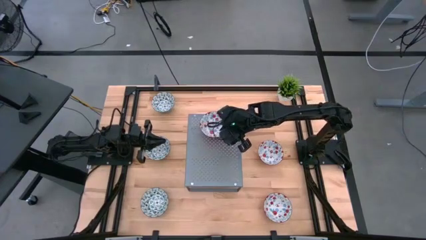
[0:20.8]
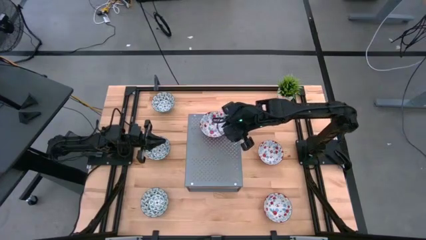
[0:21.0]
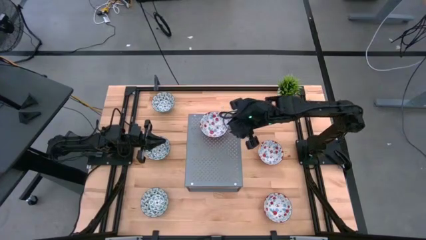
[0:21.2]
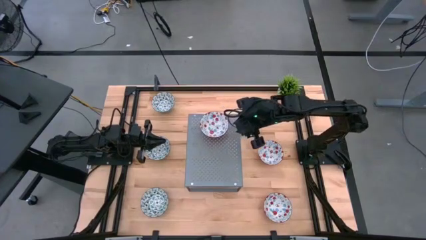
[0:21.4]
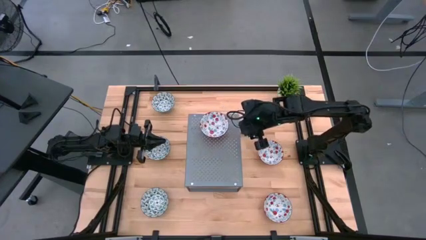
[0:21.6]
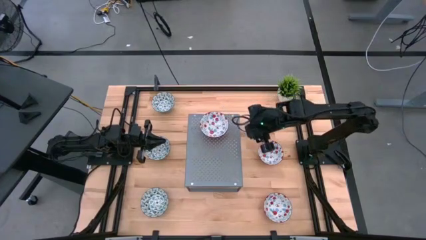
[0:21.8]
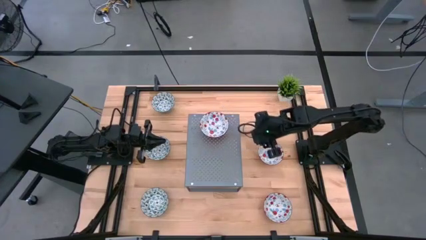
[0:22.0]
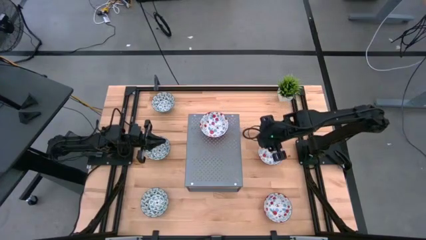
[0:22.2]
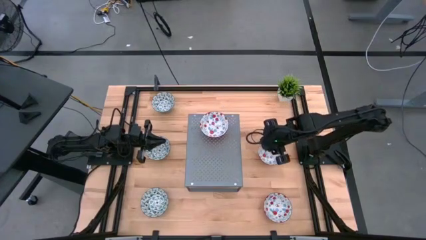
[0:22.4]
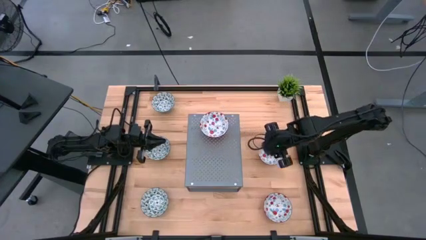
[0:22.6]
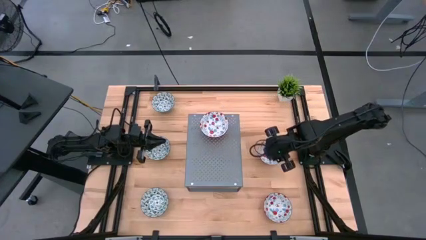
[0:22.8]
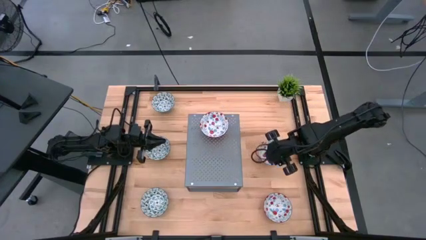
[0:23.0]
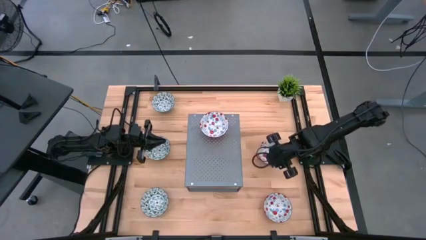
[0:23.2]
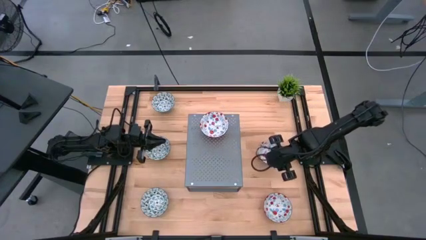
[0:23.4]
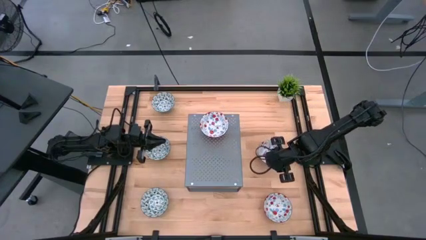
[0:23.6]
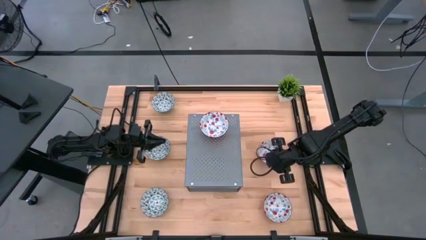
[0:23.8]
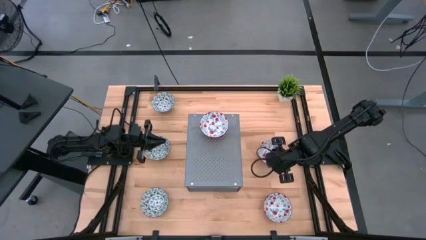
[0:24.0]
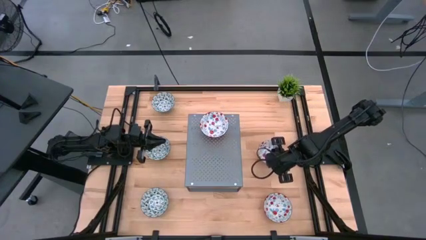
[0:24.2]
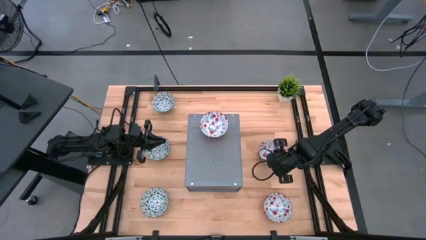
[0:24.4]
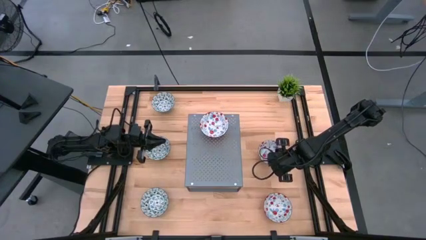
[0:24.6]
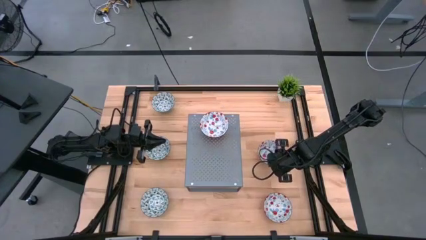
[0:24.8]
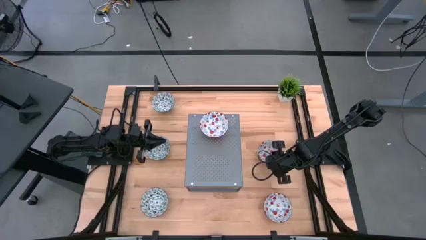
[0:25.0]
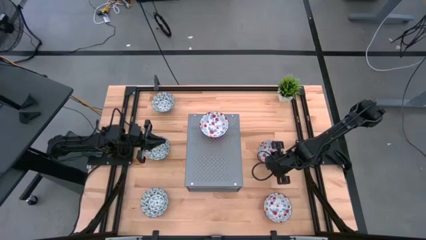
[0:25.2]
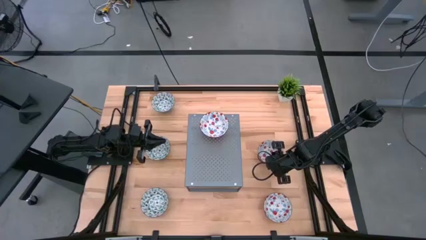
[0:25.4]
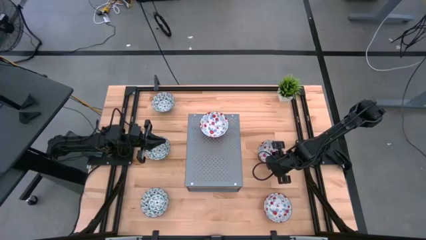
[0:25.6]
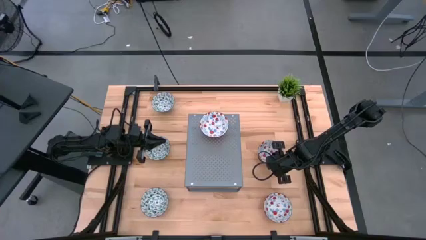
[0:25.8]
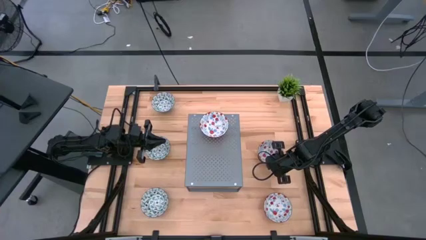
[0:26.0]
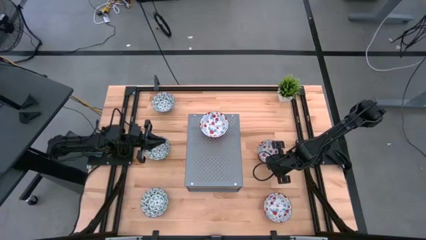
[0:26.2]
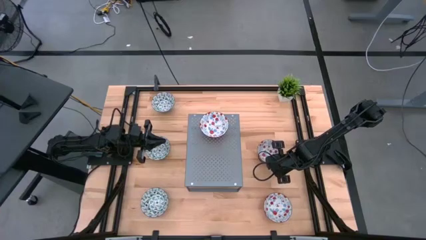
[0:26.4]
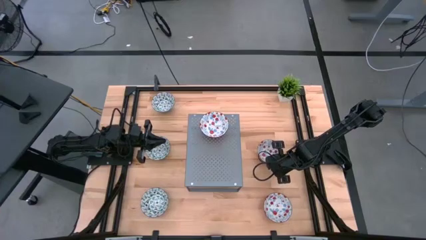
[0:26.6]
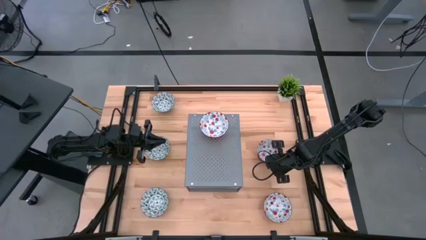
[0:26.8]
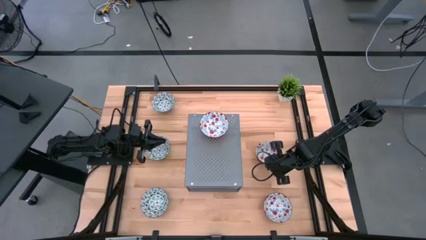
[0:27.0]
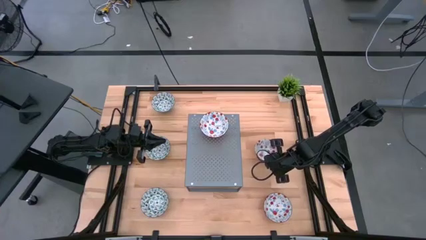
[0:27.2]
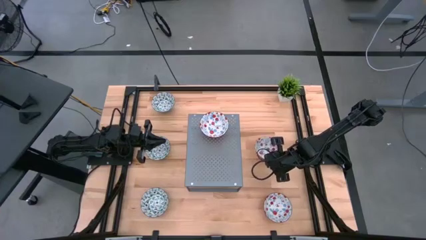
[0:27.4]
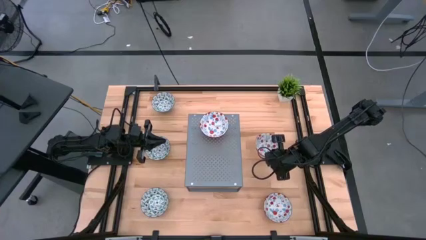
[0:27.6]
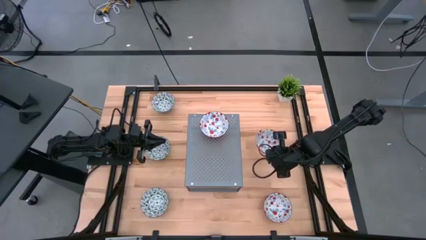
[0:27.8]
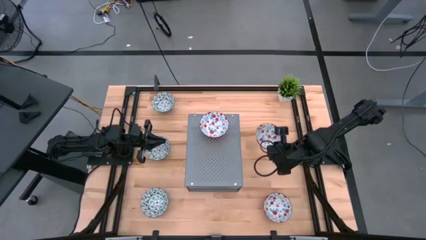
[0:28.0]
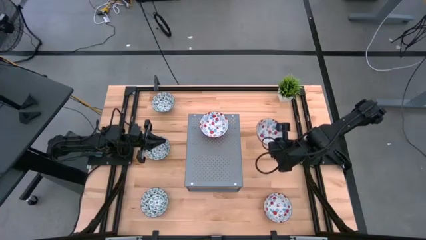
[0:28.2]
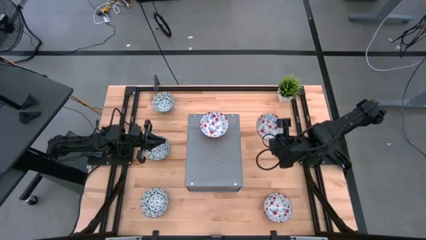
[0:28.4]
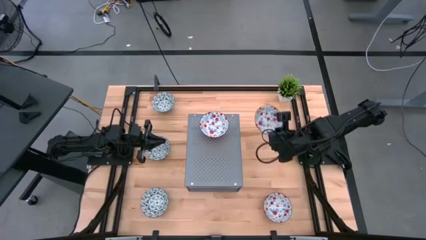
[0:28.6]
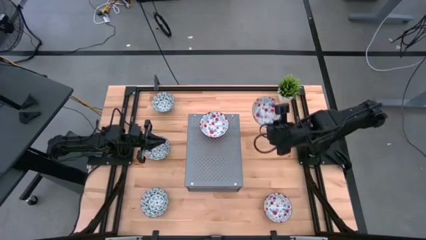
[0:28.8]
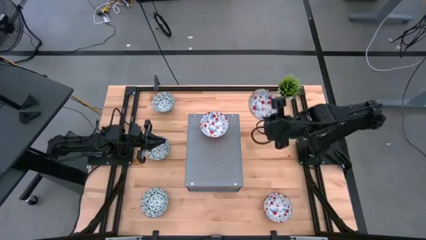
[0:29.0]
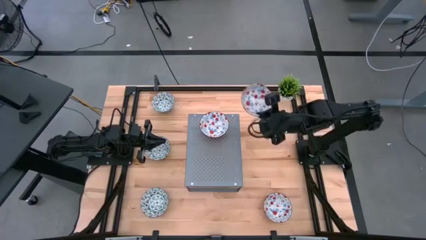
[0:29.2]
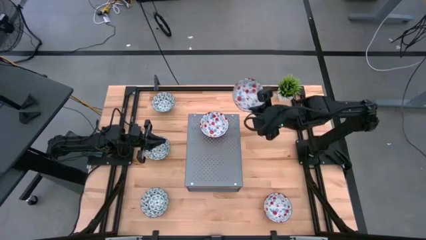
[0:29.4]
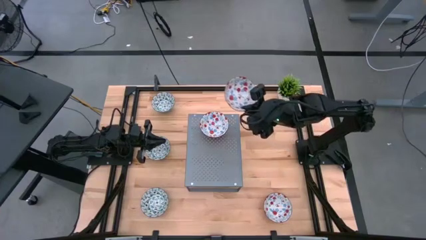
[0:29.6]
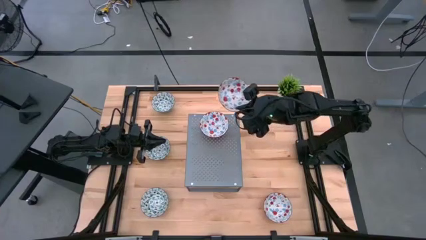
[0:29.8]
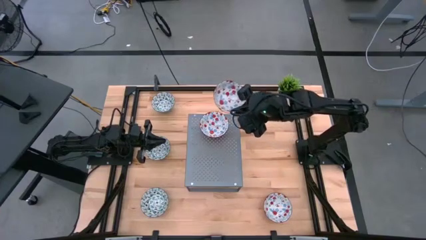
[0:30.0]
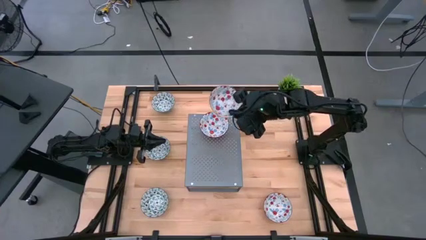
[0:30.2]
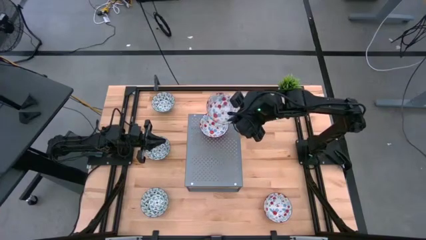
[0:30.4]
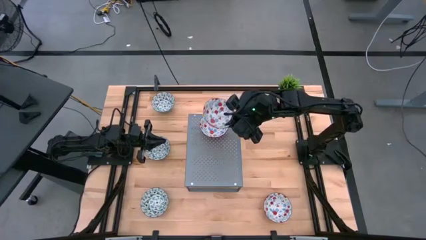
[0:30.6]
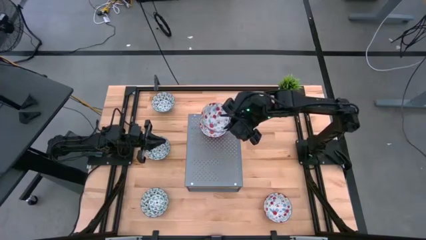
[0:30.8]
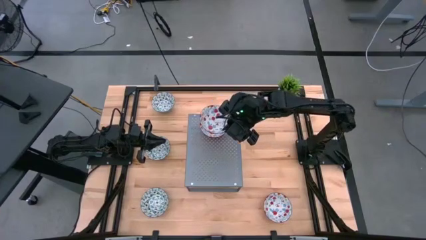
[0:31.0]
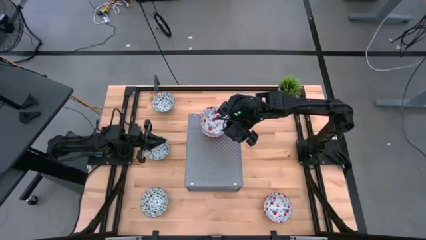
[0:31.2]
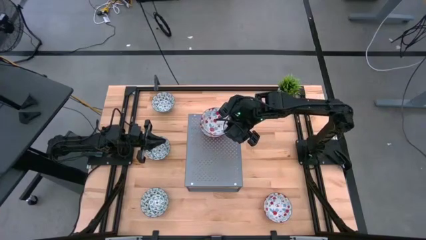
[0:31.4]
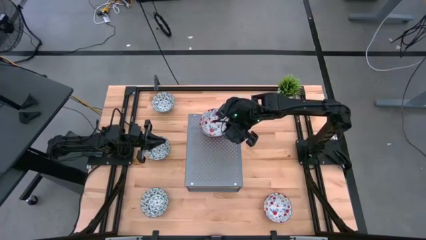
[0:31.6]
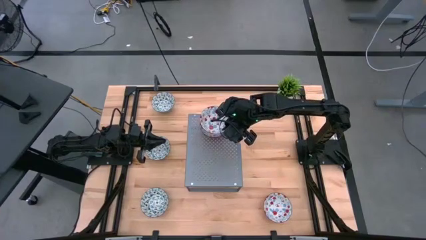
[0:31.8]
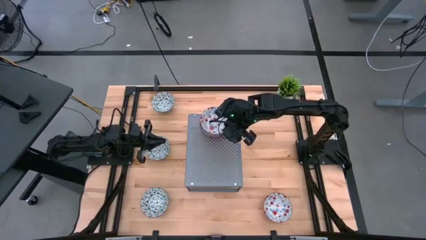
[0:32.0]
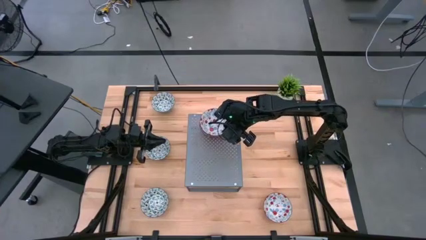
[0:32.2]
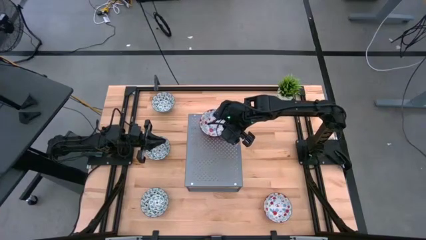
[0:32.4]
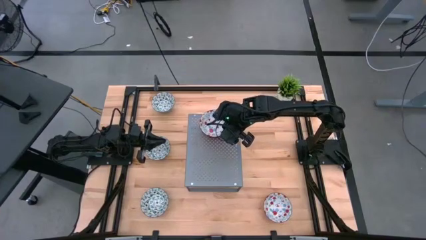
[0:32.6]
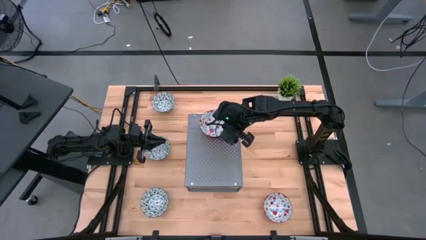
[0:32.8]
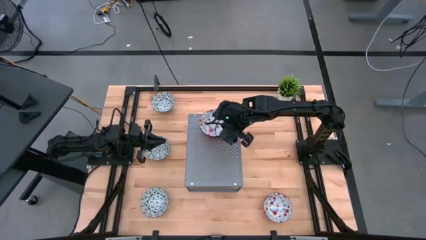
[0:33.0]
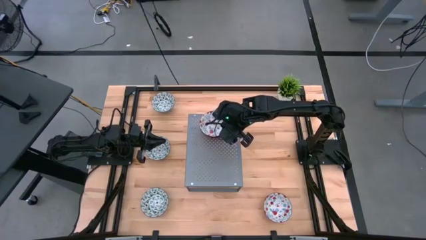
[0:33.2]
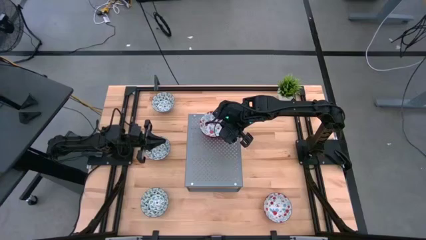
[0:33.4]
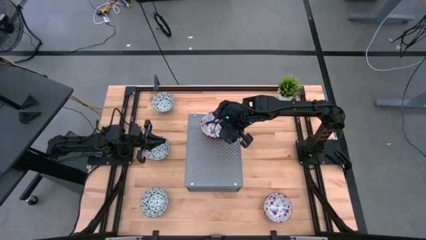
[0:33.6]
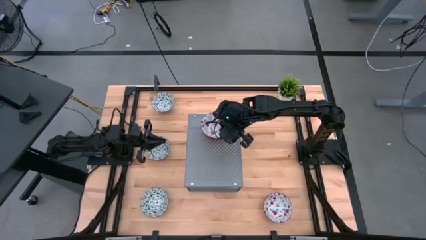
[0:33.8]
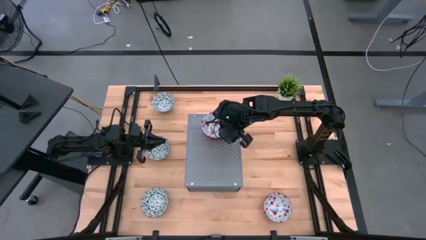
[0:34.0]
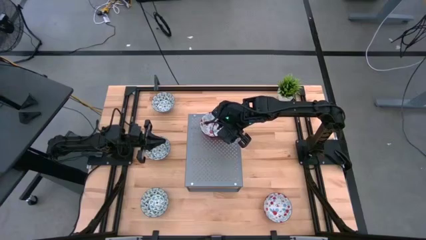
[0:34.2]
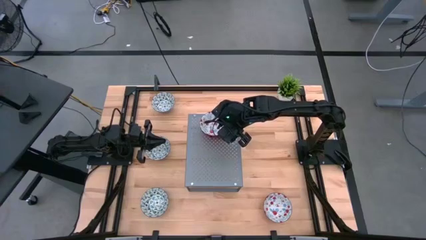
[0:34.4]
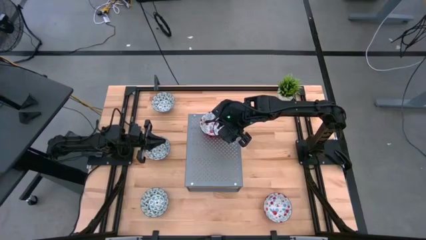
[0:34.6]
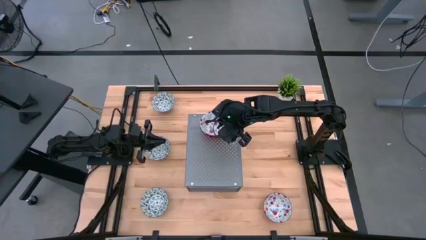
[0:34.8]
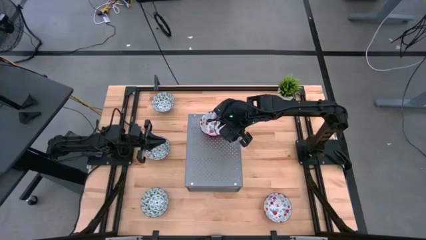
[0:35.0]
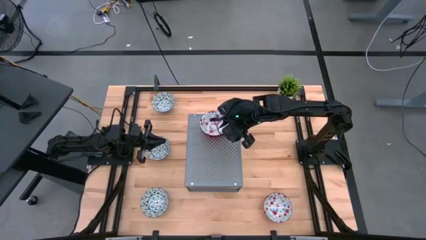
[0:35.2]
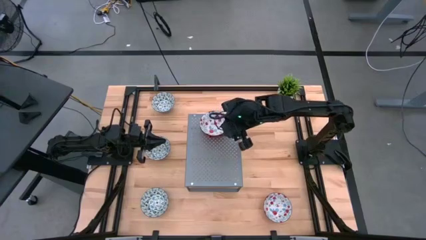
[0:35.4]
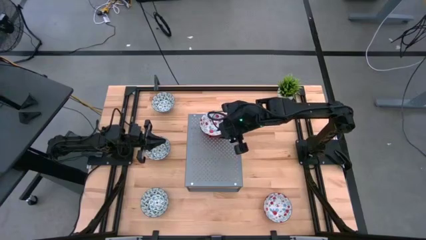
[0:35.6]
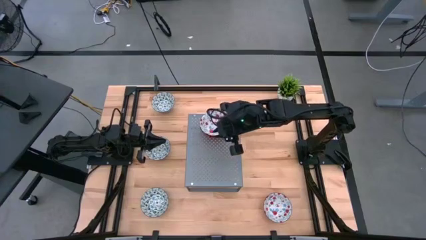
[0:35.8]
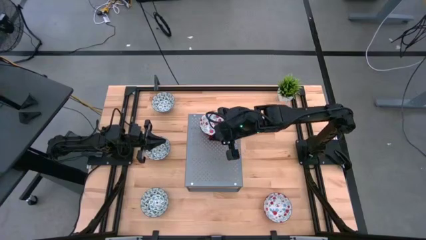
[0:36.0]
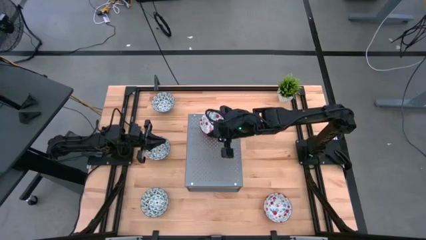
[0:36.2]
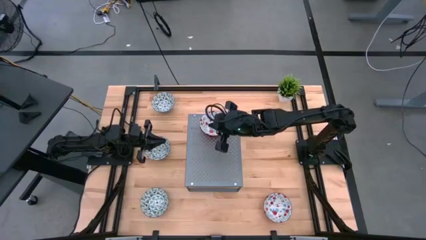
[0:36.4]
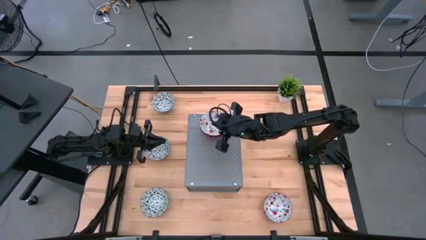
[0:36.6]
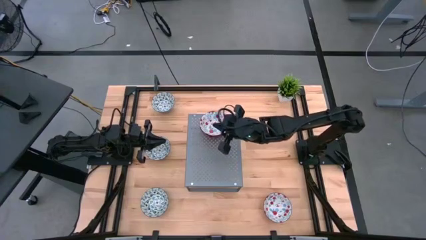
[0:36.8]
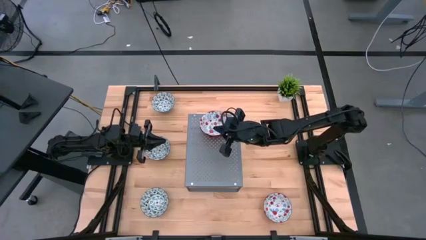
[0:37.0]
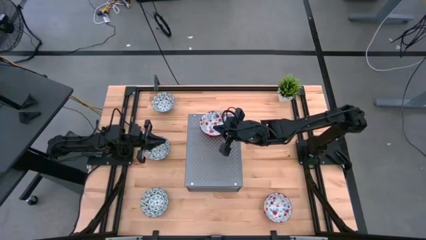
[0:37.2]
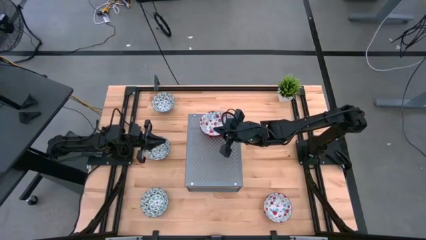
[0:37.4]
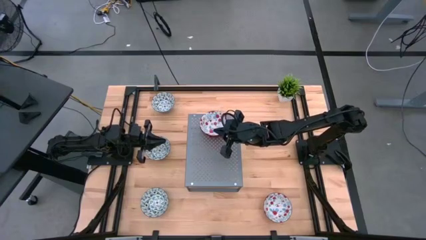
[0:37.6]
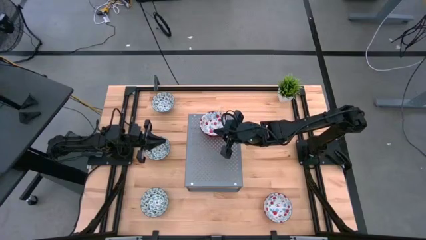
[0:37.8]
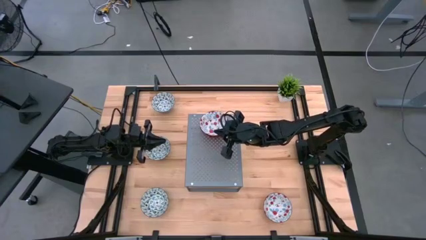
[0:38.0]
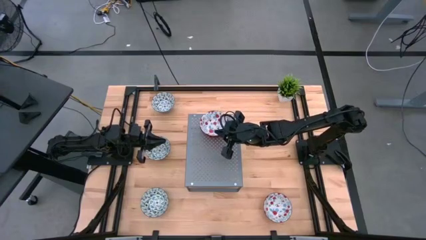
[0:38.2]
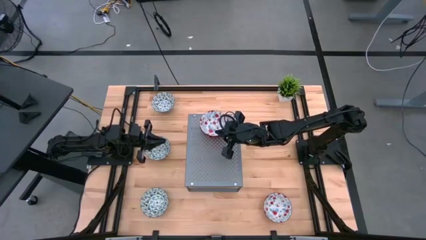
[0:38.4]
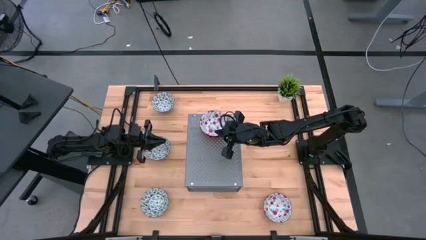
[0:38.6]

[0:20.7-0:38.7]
Task: Pick & Place Mini bowls
Put the top red bowl on top of the red bowl on the shelf
